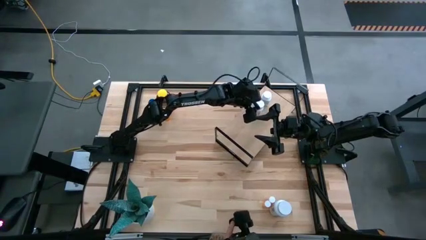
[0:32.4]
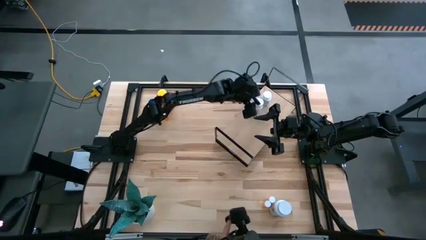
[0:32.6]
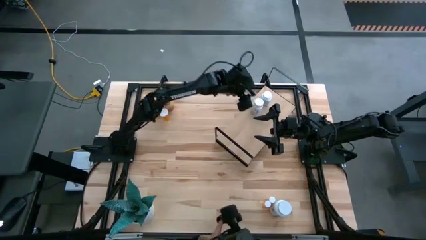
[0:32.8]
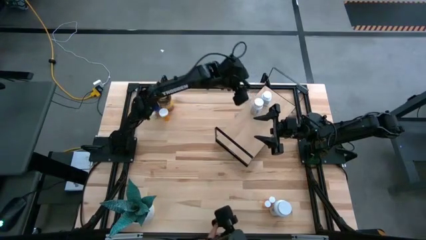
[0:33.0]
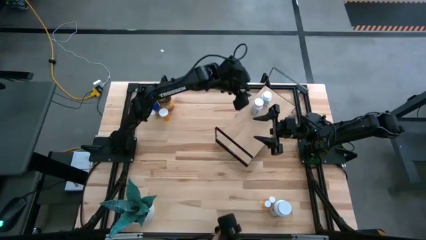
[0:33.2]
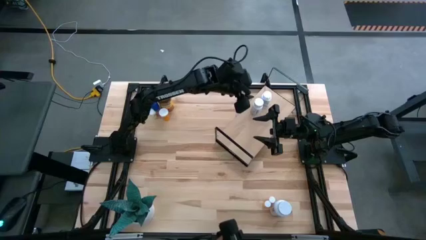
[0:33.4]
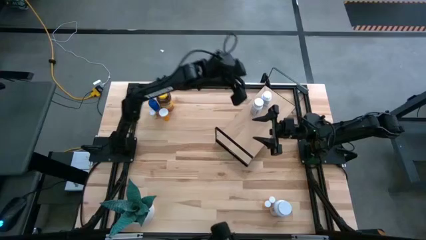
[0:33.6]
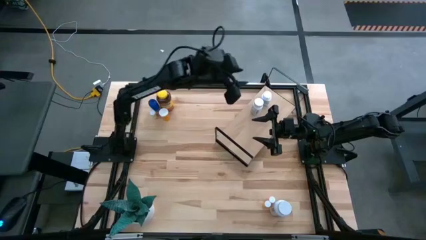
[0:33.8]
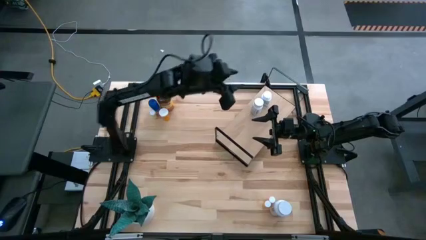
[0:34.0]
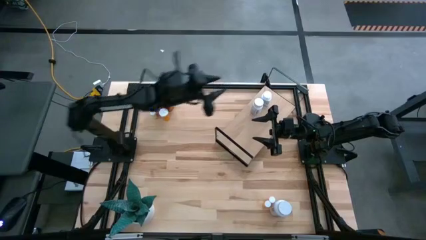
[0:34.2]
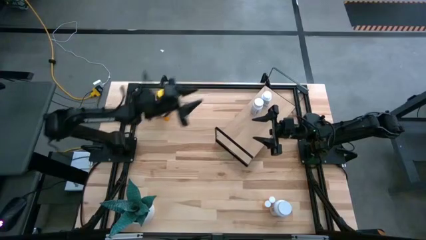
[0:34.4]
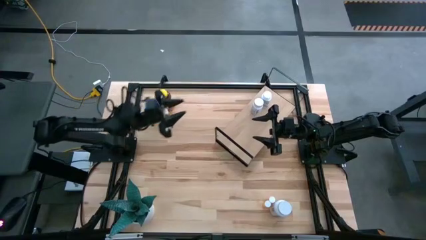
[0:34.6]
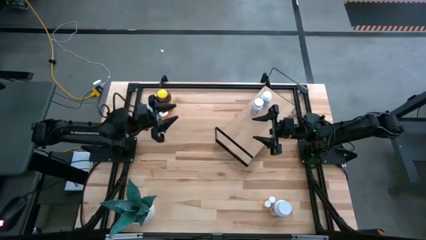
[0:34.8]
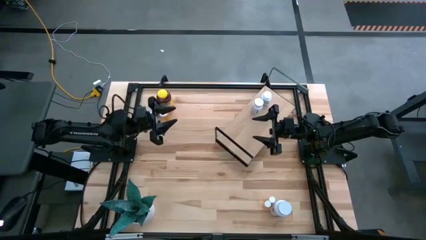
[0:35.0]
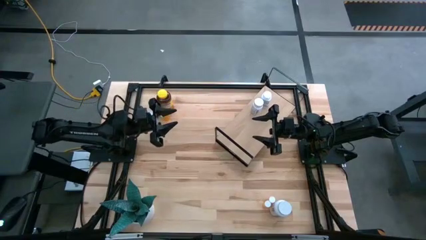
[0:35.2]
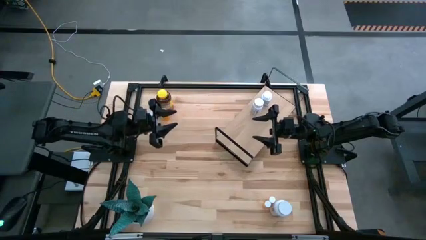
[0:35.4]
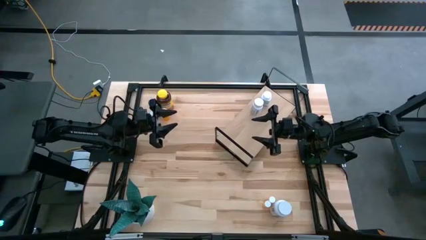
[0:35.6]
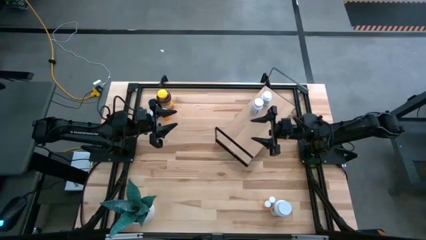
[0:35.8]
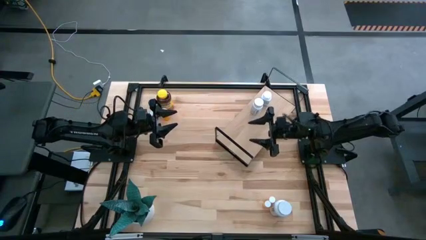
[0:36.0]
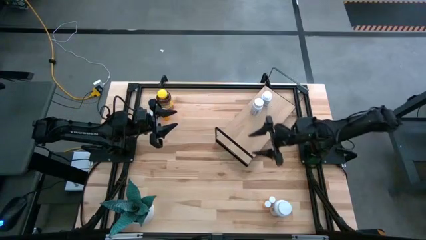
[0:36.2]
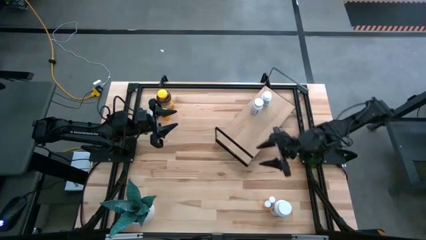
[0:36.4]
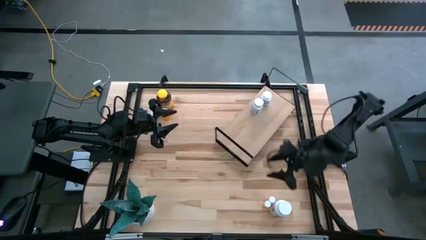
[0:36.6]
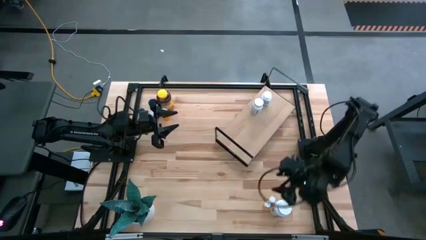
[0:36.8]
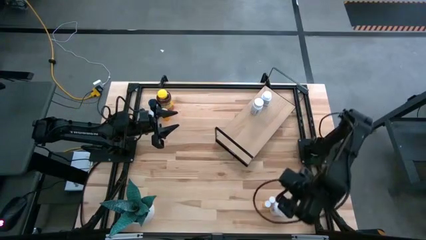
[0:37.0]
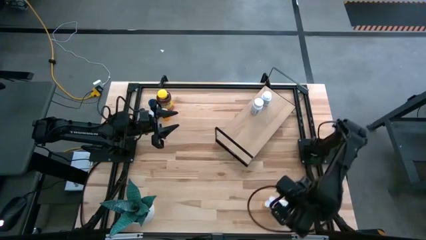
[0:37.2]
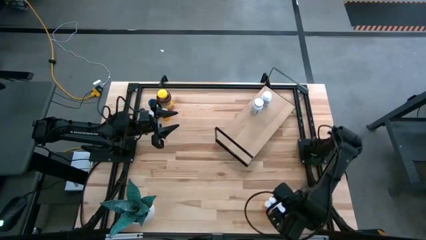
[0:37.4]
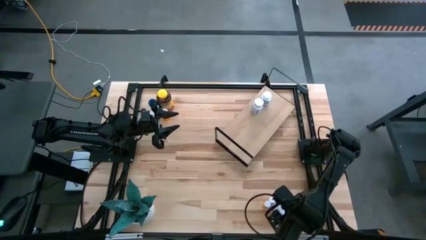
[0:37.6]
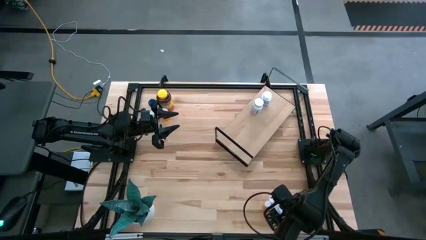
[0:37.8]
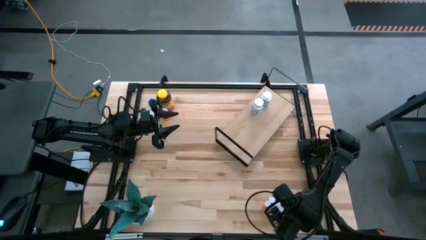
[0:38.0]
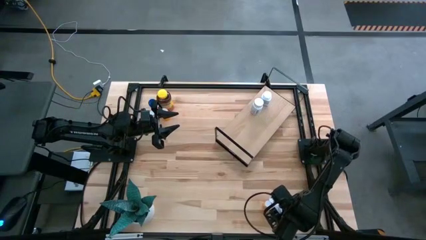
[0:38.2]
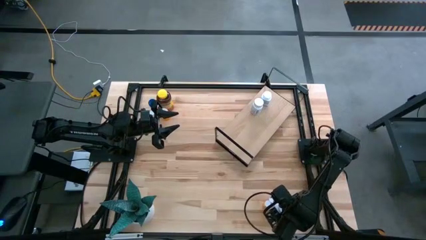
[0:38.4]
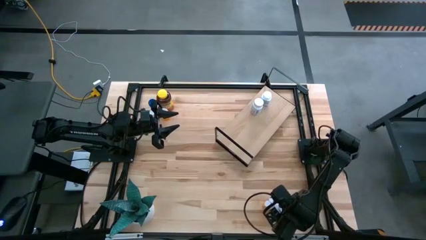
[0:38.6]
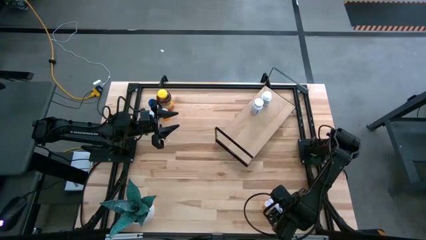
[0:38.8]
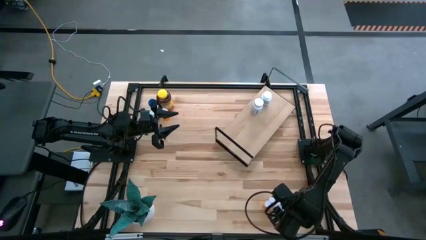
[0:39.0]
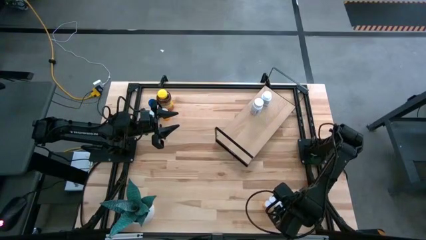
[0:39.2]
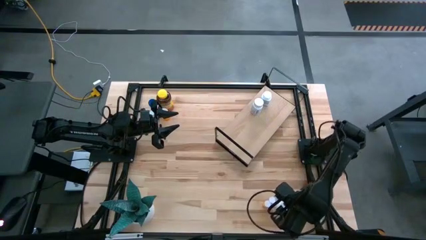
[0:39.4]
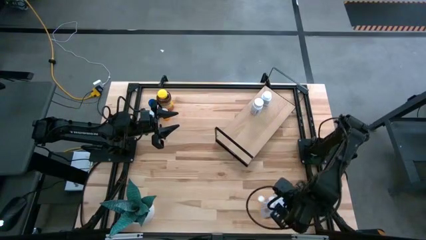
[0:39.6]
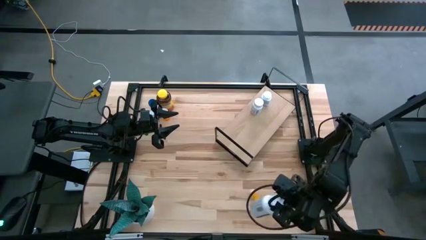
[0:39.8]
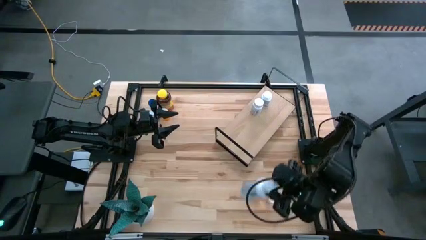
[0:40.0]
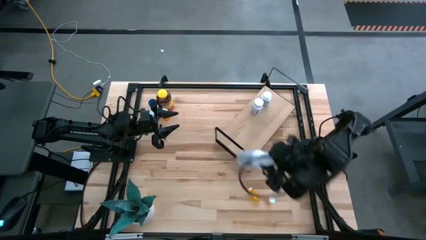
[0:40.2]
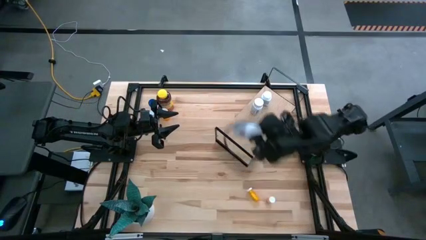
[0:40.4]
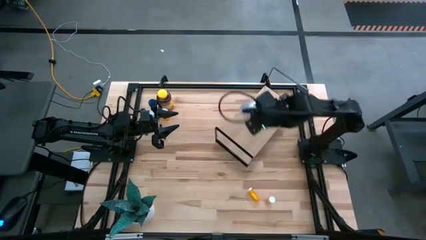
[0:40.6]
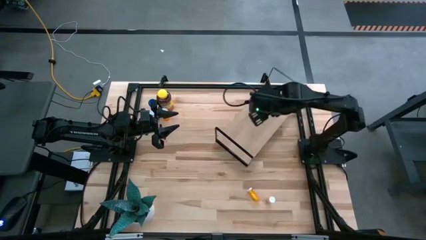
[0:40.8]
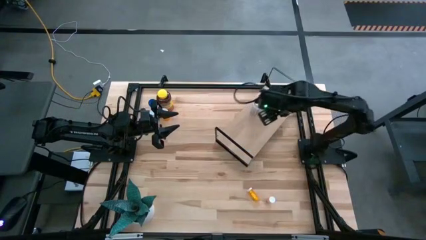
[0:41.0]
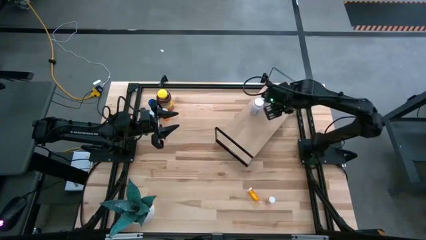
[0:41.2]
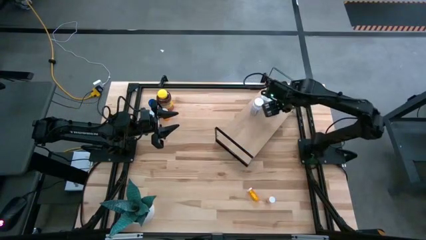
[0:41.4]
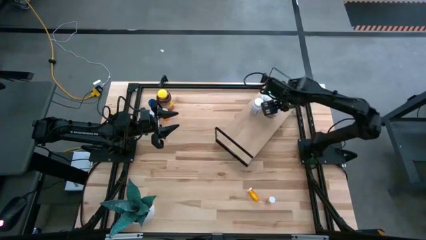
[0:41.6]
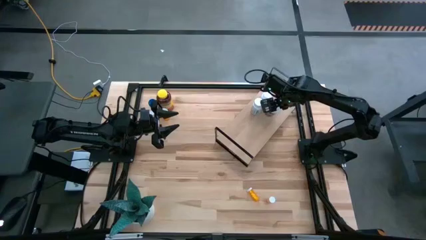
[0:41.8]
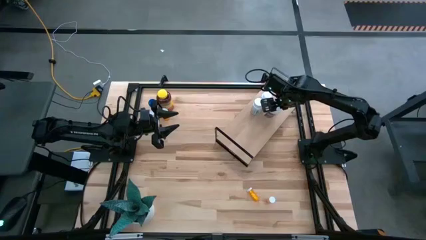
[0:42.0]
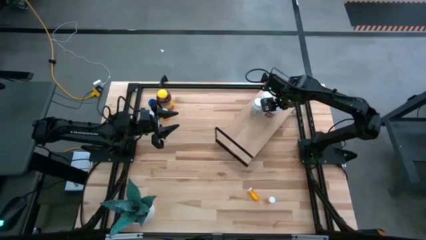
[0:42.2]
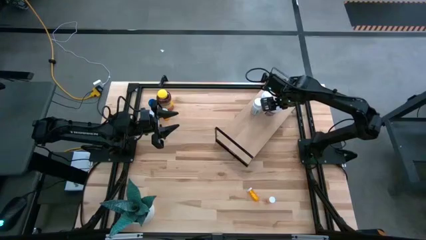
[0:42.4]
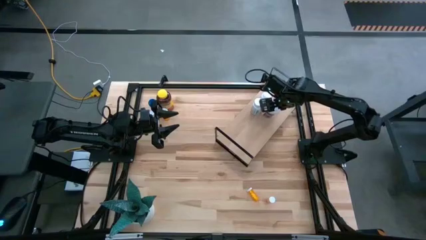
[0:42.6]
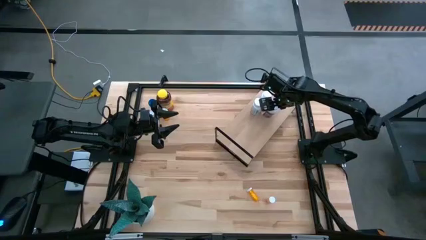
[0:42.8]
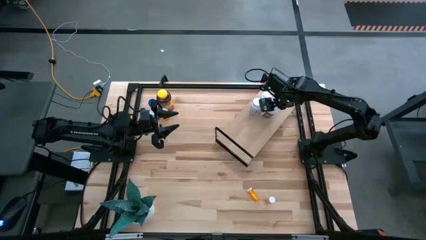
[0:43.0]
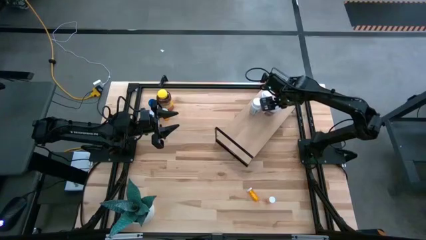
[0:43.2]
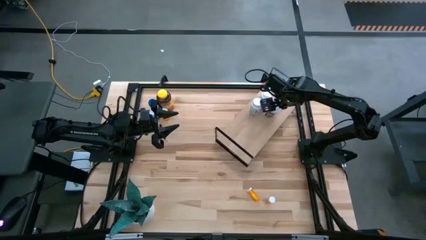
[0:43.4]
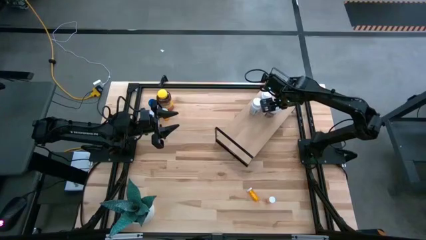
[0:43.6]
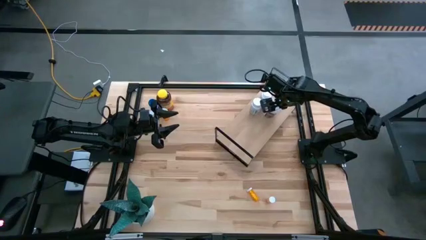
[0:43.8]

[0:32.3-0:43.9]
Task: Pick and place medicine bottles onto shelf by color
Put the big white medicine bottle on the shelf

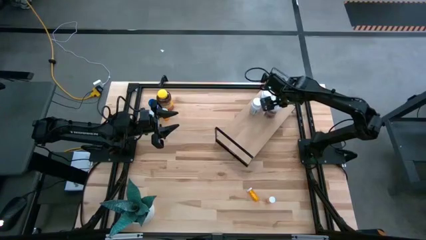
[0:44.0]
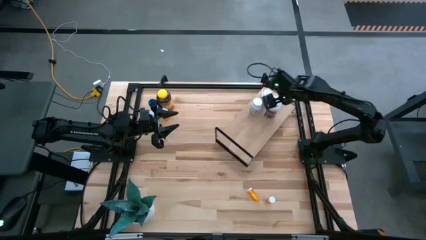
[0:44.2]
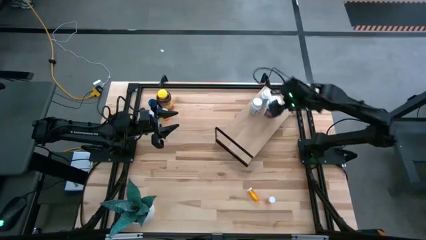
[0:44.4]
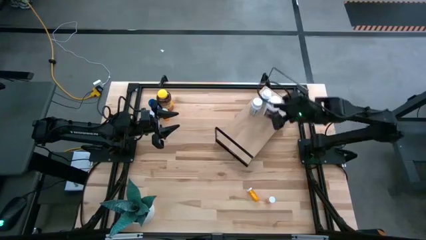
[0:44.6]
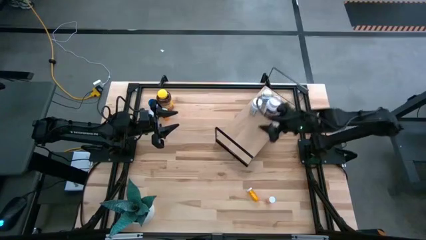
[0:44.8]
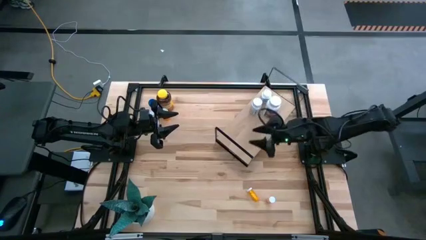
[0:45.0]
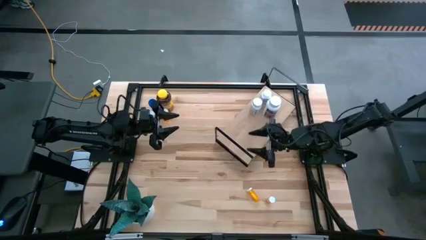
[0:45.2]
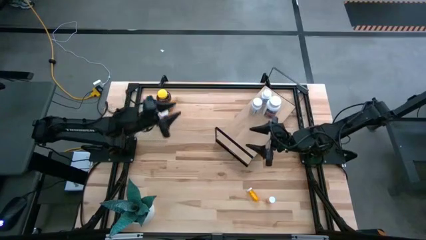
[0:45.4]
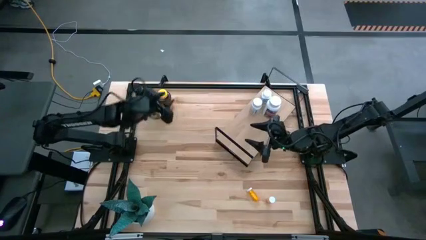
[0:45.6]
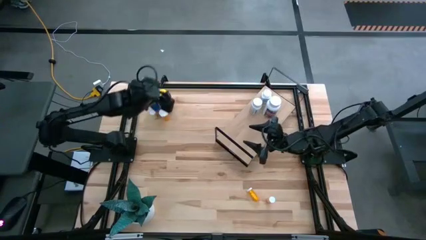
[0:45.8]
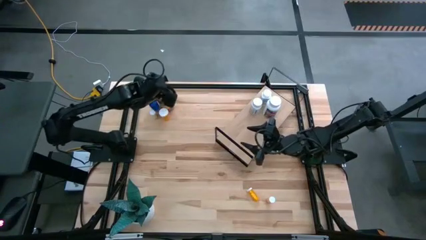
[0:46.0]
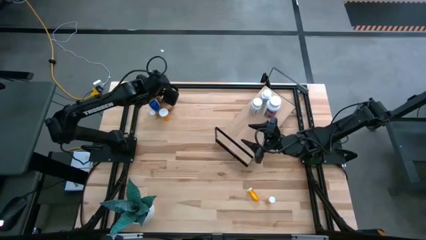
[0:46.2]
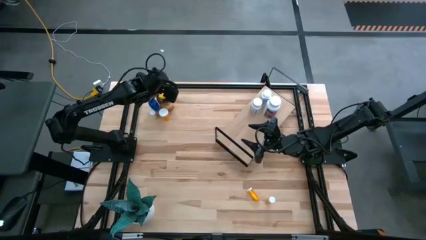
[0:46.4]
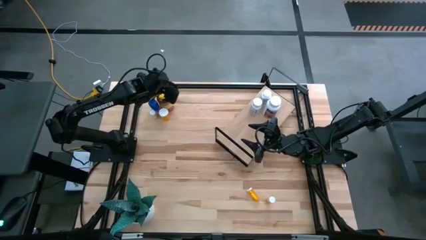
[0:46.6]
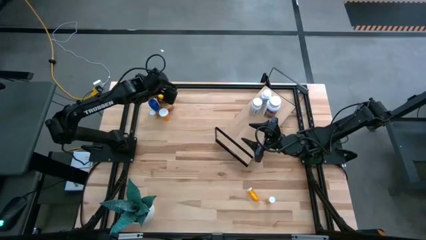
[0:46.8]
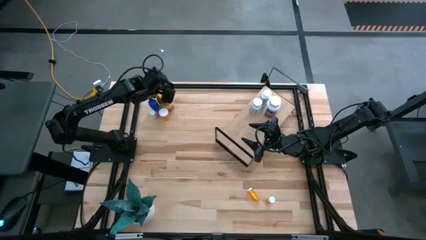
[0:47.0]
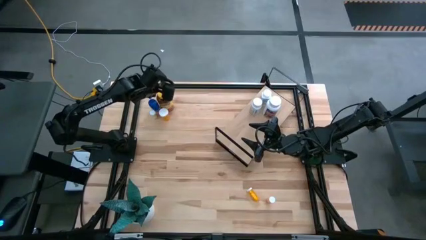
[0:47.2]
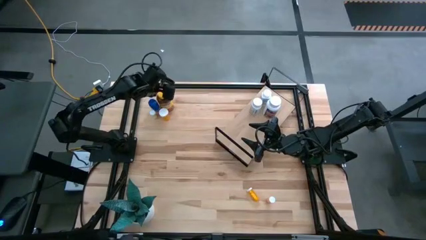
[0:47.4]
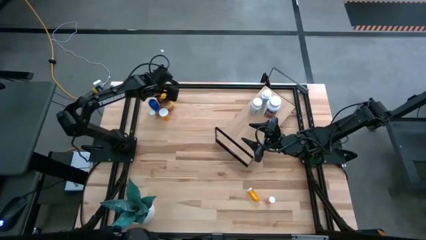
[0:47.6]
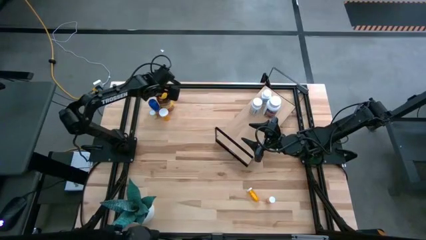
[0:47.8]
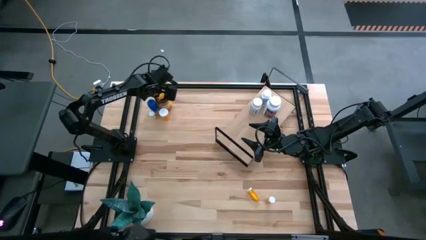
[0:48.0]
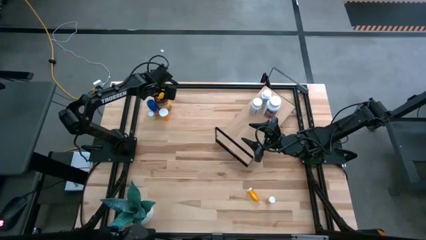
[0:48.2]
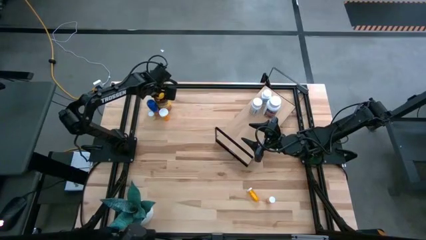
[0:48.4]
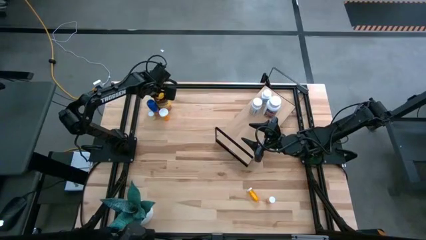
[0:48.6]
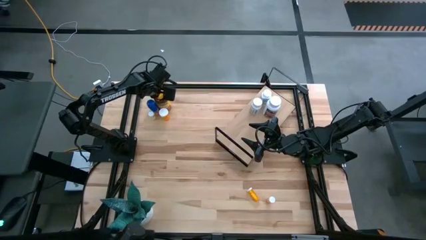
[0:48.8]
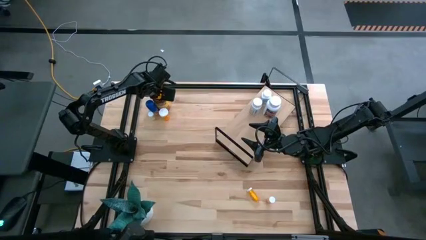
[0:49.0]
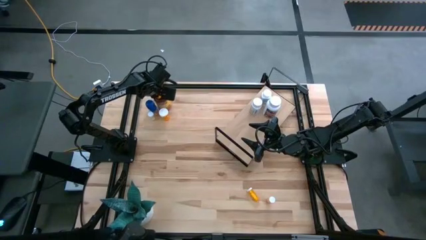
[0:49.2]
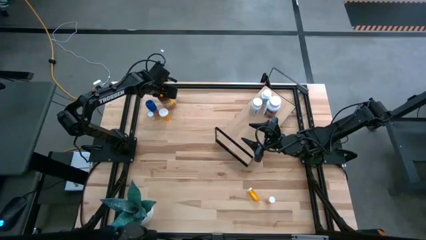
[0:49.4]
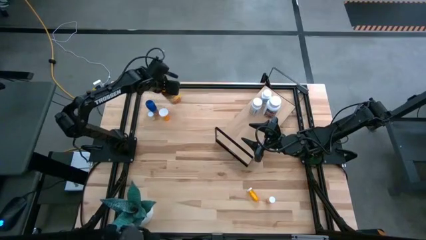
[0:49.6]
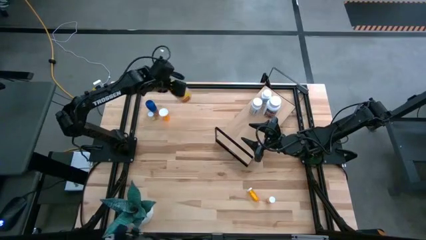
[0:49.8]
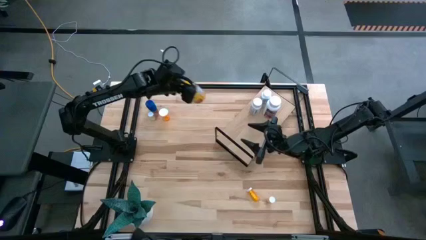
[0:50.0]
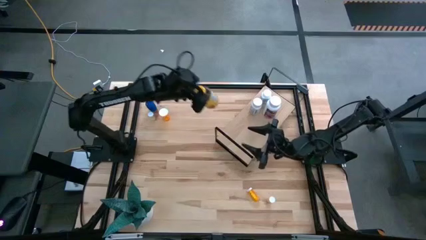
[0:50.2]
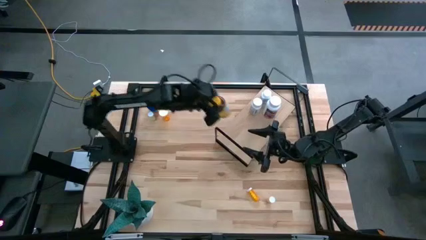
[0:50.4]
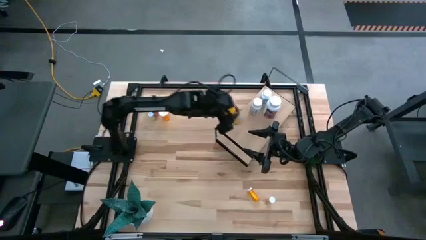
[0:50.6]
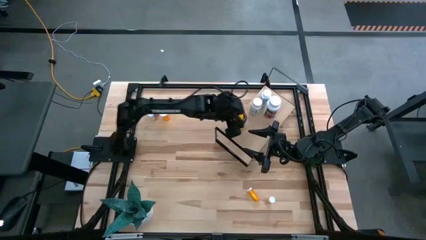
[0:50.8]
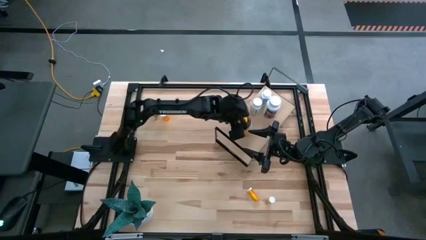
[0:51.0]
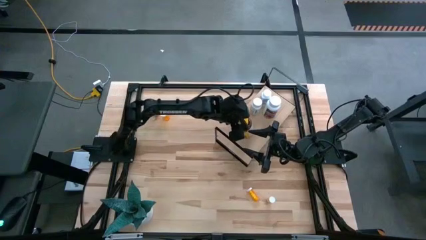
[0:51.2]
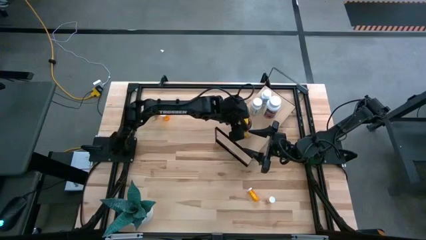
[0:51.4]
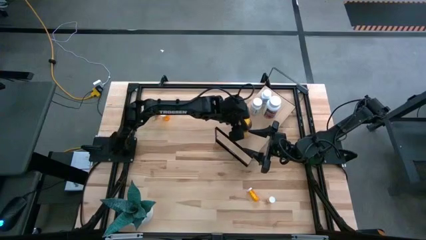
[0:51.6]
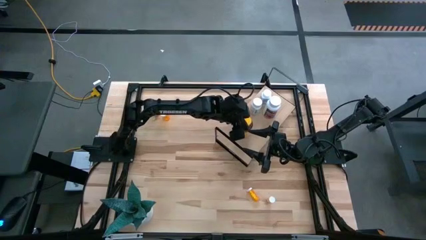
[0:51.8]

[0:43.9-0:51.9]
Put the yellow medicine bottle on the shelf
